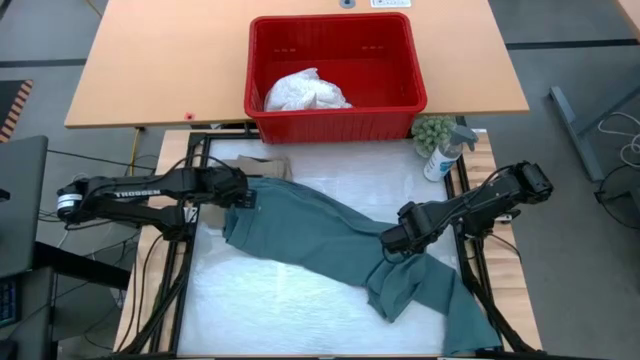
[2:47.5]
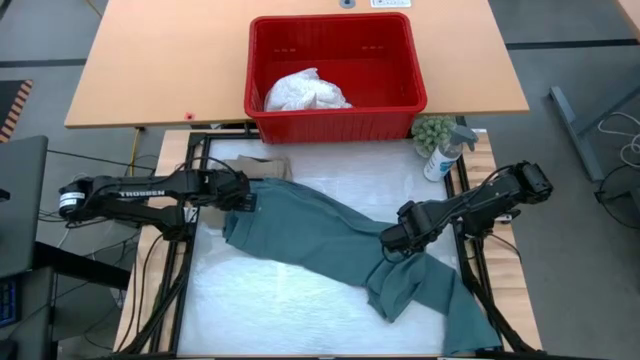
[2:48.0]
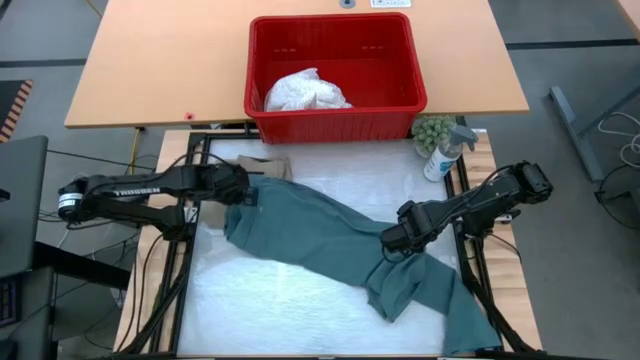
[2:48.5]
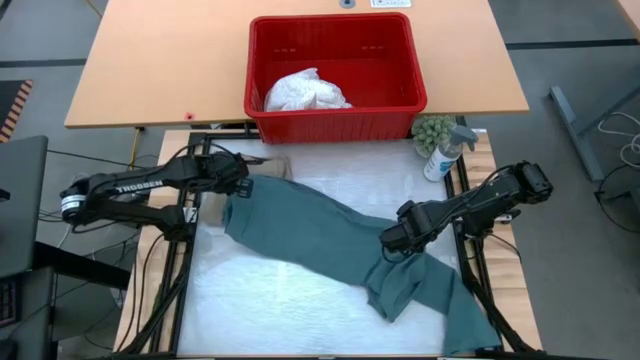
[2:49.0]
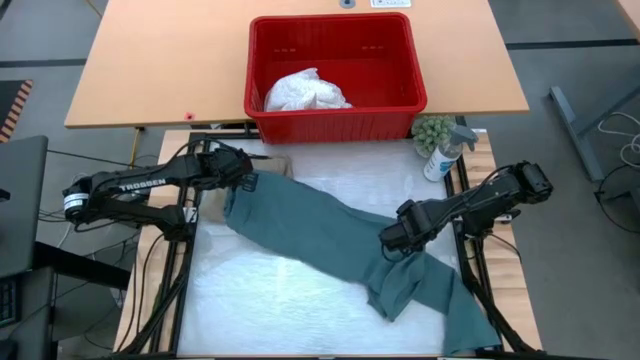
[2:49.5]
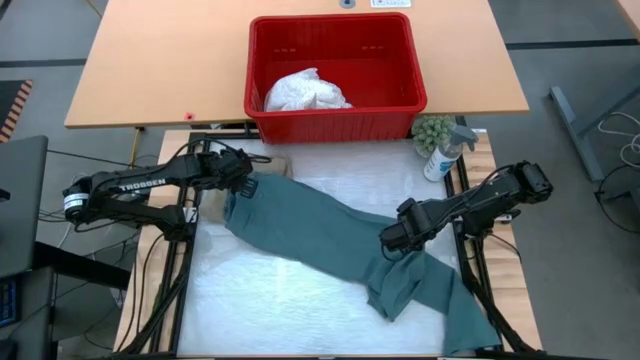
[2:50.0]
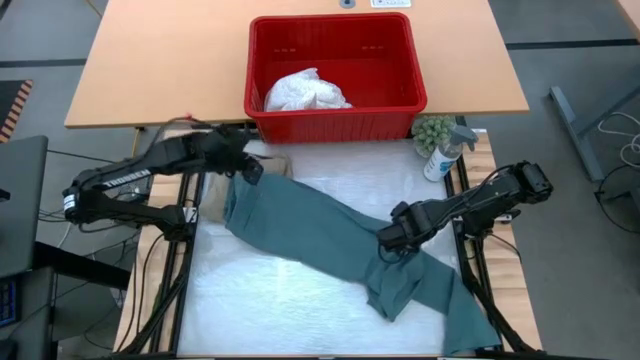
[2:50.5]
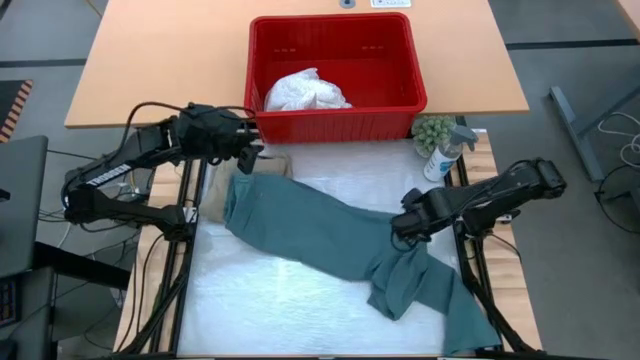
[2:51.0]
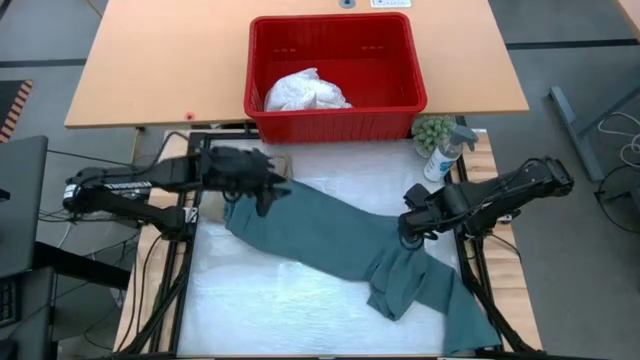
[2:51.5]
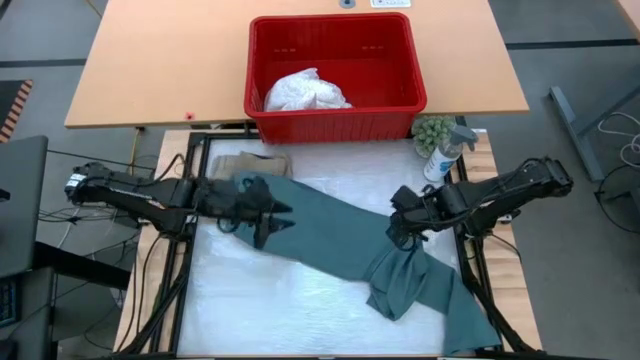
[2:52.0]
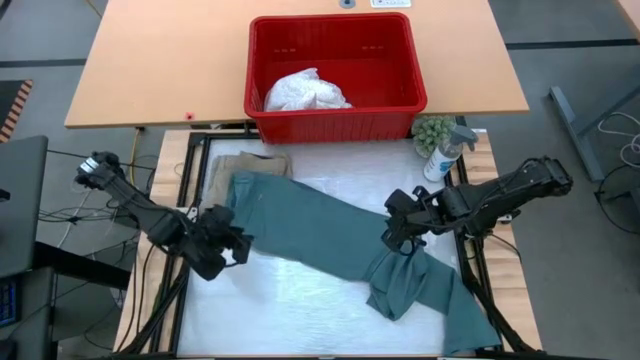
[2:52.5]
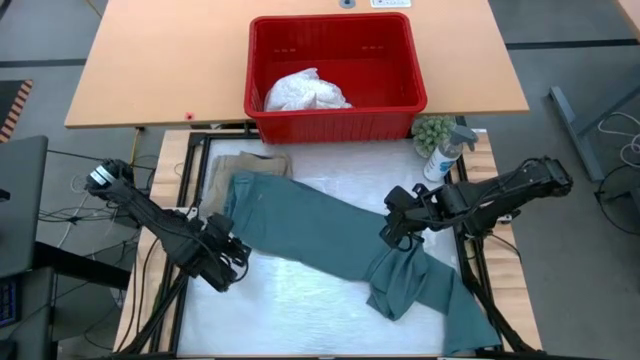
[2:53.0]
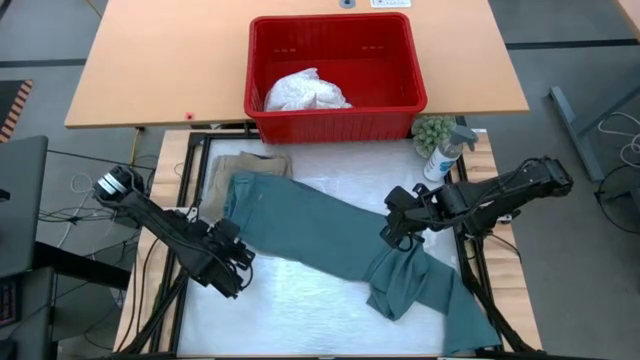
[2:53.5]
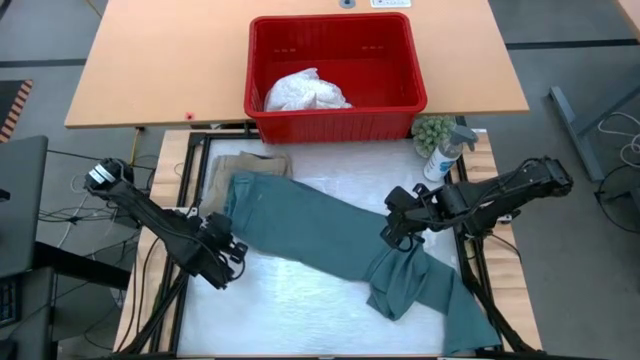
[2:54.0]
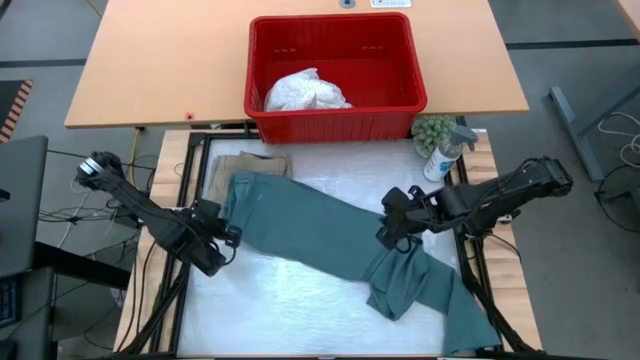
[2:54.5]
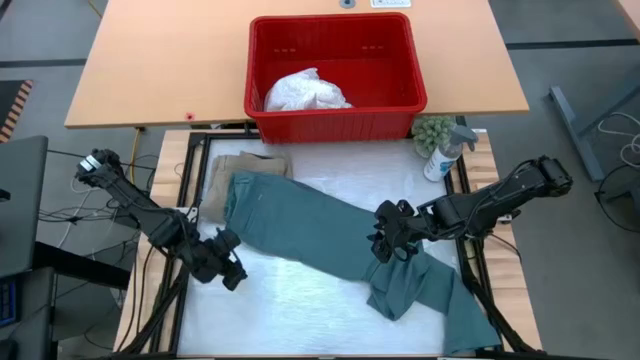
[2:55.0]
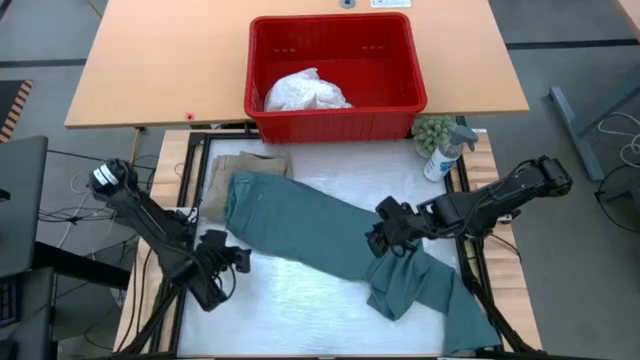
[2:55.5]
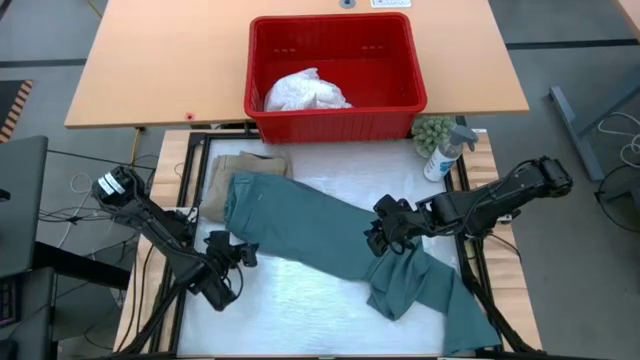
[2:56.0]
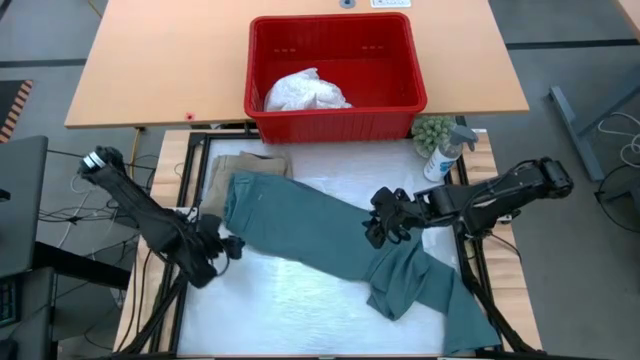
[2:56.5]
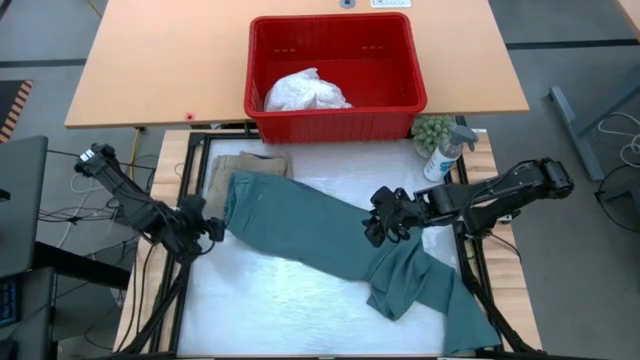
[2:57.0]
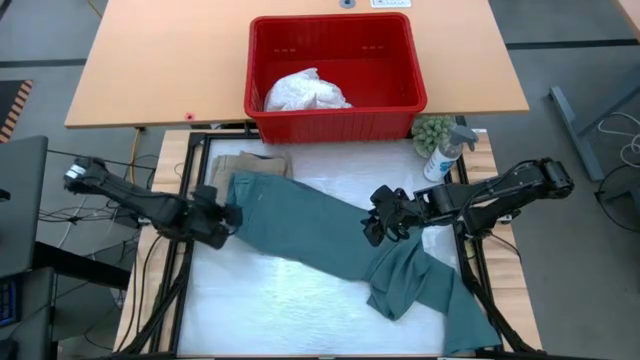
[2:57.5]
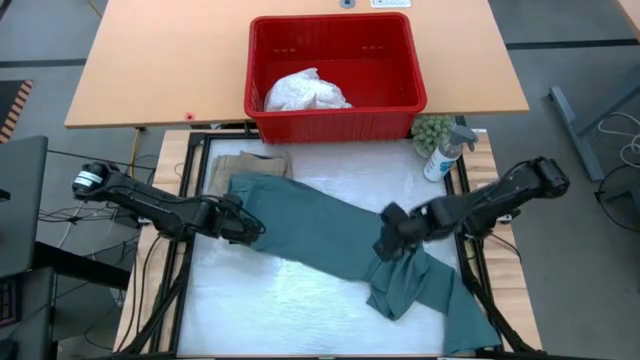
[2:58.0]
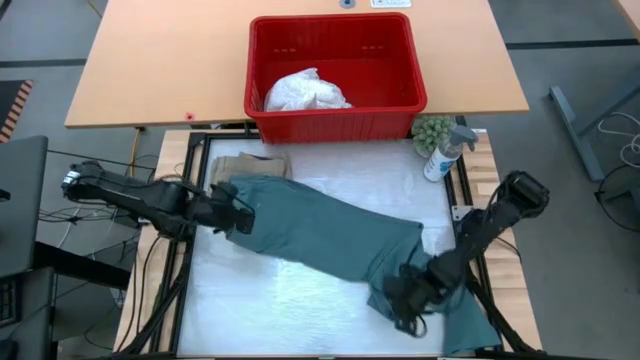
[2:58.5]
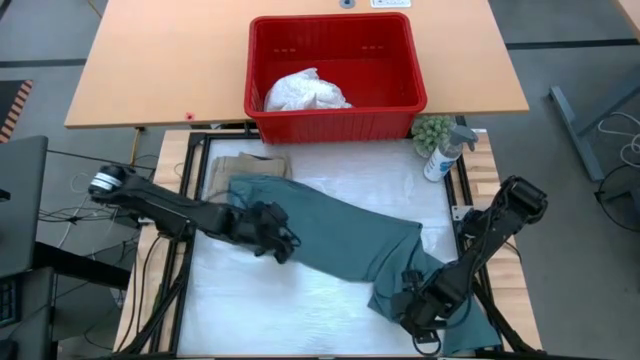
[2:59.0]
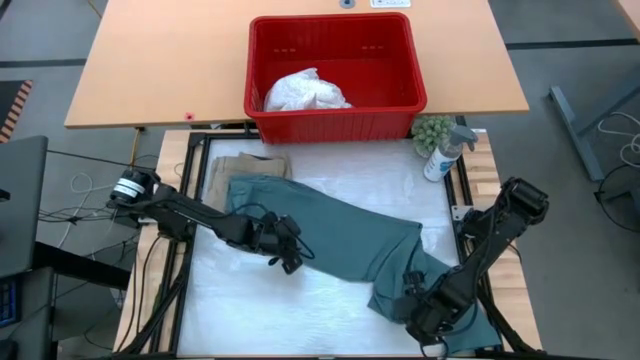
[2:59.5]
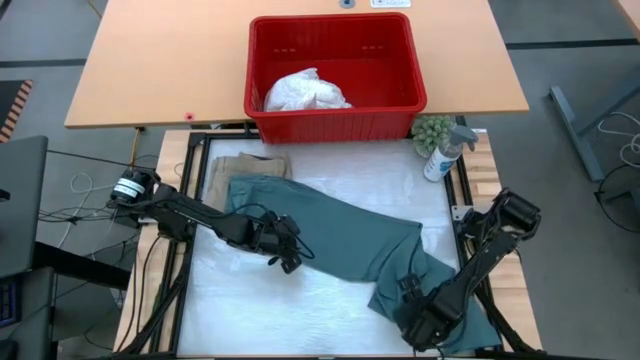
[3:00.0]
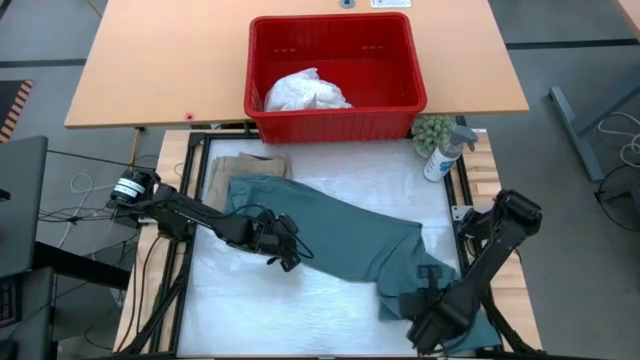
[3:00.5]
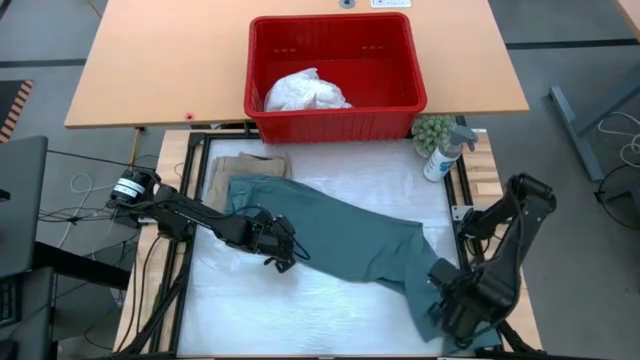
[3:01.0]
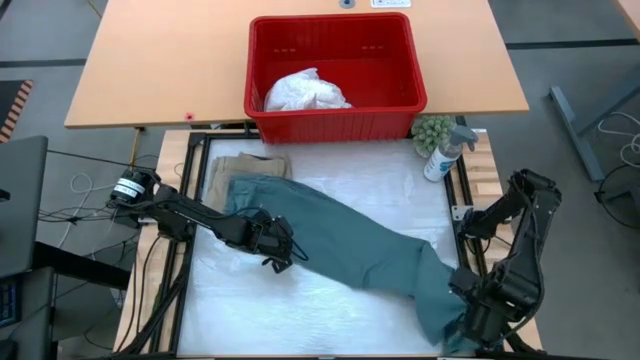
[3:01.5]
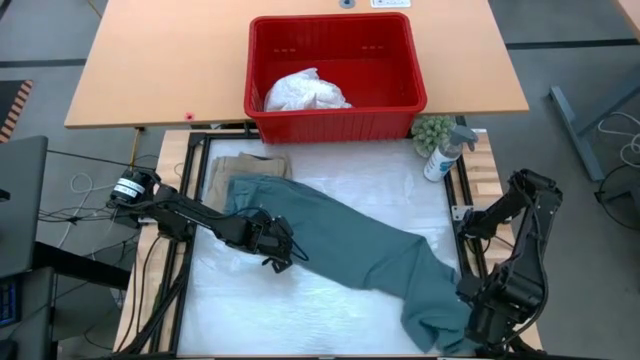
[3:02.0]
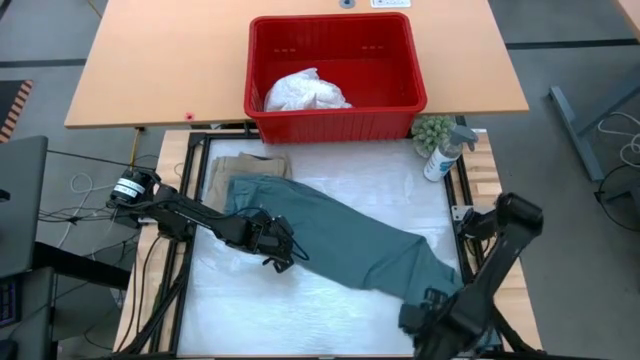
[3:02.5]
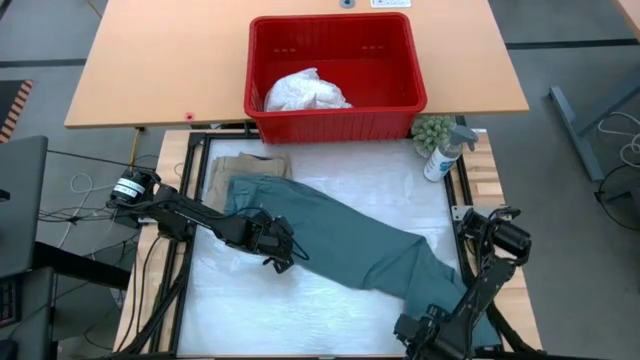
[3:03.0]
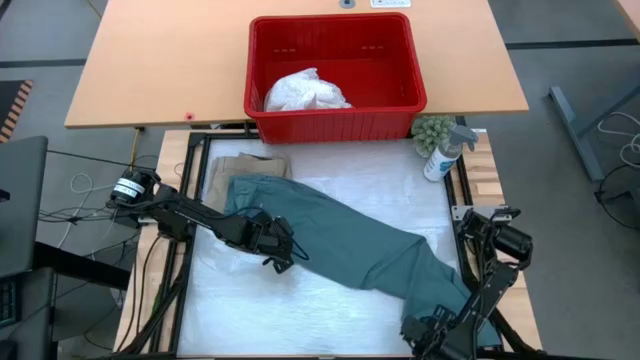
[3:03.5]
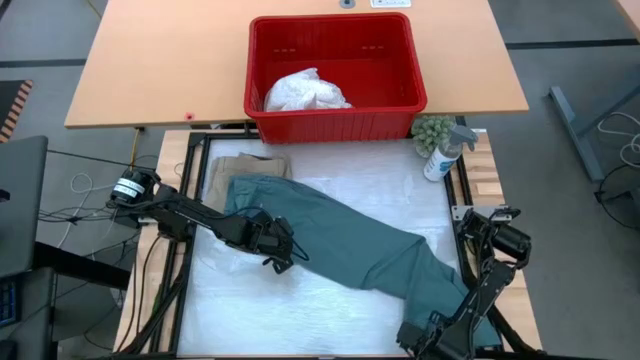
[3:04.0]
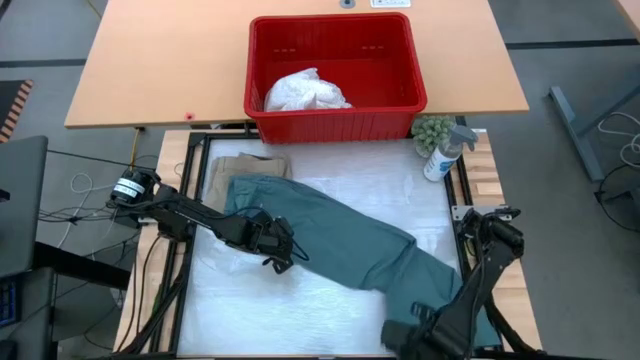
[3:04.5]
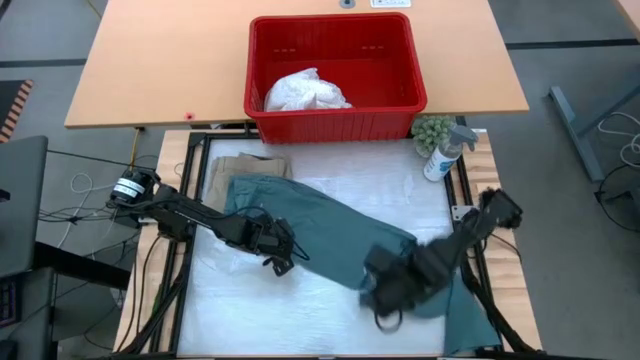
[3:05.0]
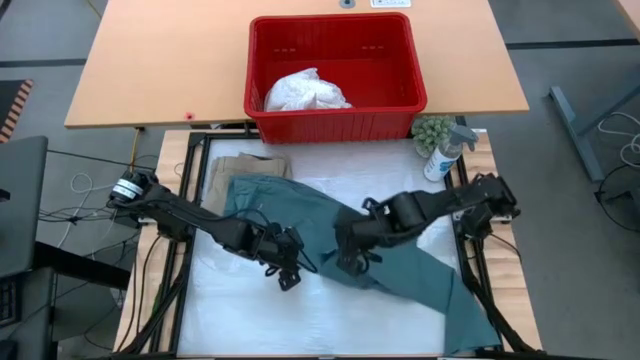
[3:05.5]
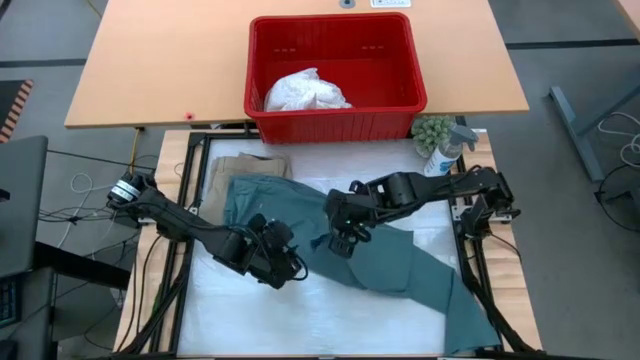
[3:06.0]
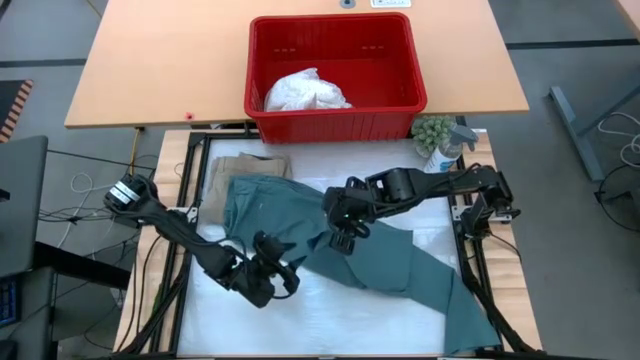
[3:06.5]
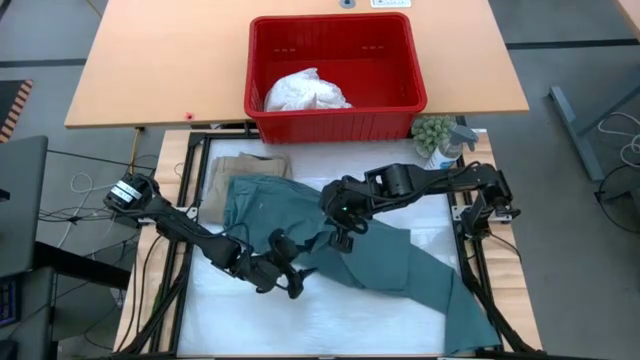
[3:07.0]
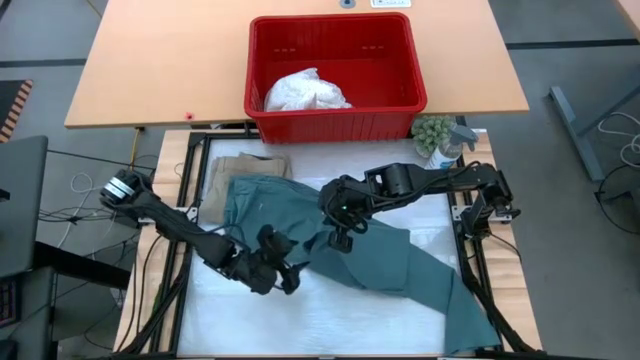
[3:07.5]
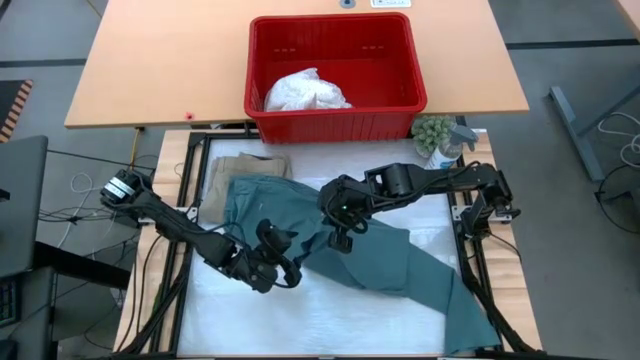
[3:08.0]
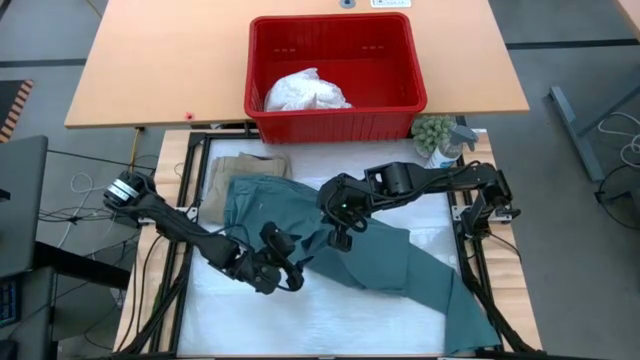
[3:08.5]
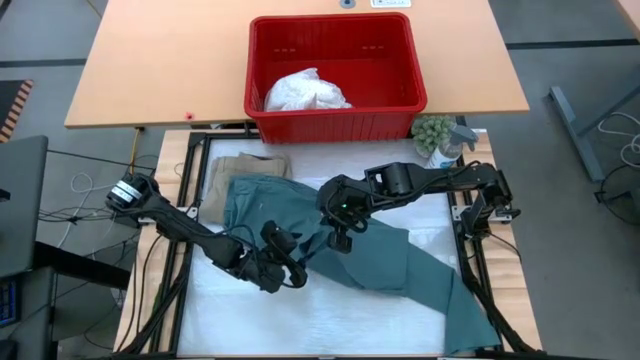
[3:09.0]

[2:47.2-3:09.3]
Task: Fold Laundry from Bin
Fold the blue pants in the red bin
